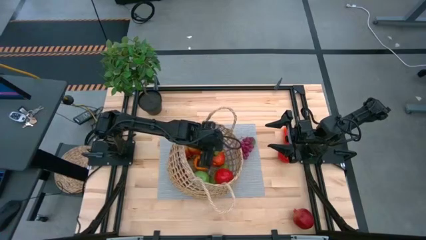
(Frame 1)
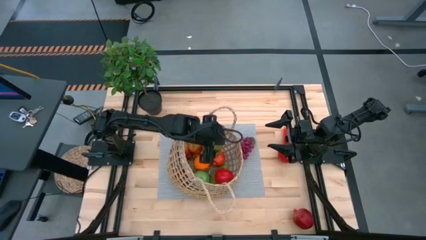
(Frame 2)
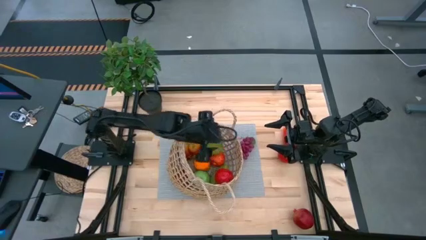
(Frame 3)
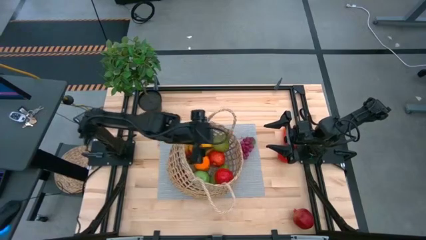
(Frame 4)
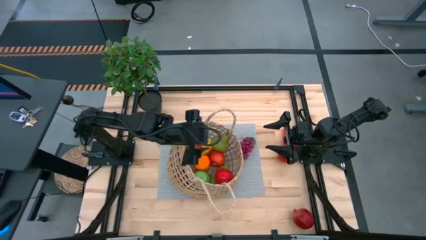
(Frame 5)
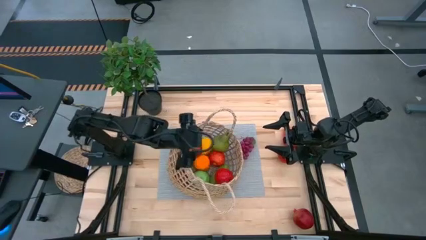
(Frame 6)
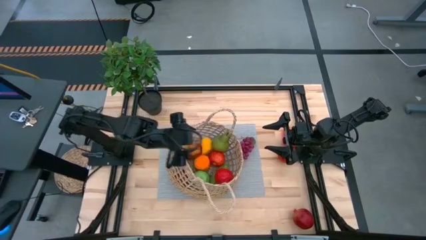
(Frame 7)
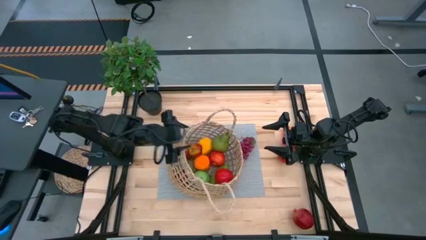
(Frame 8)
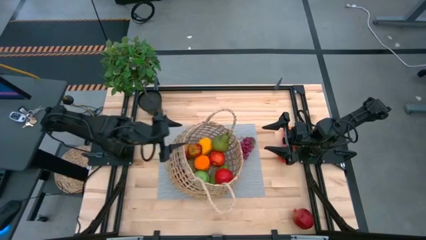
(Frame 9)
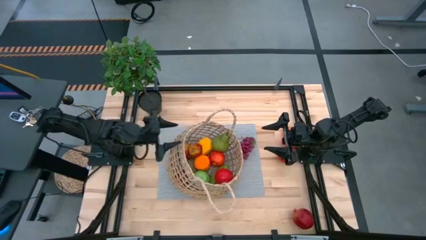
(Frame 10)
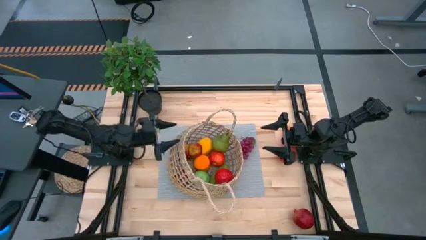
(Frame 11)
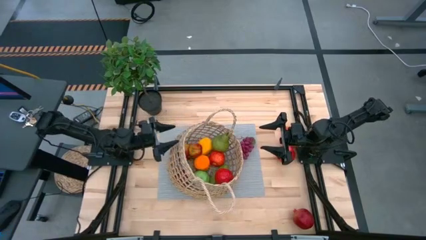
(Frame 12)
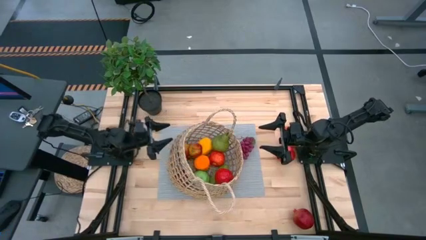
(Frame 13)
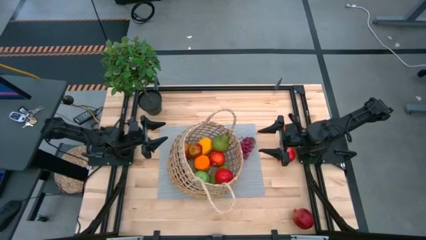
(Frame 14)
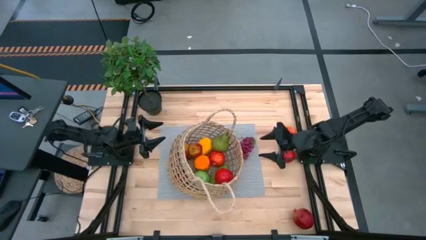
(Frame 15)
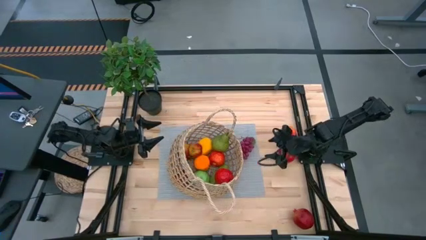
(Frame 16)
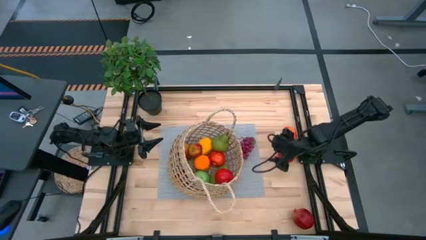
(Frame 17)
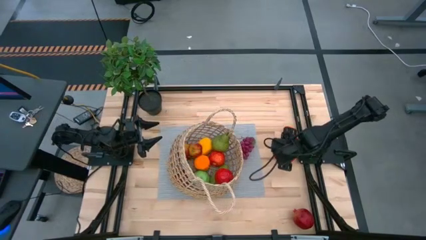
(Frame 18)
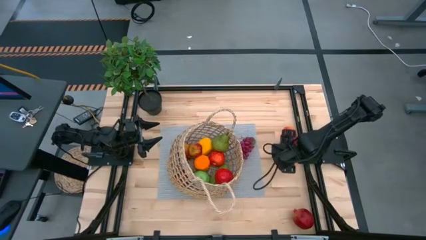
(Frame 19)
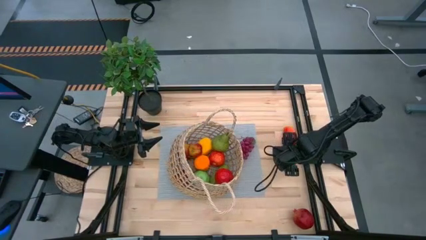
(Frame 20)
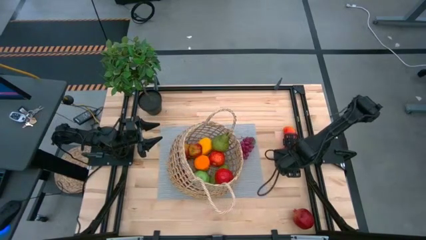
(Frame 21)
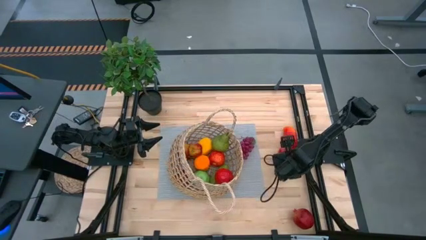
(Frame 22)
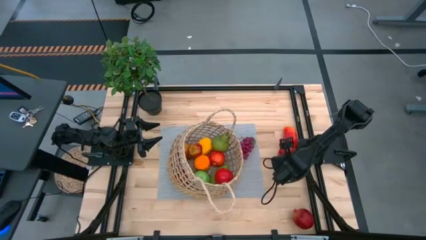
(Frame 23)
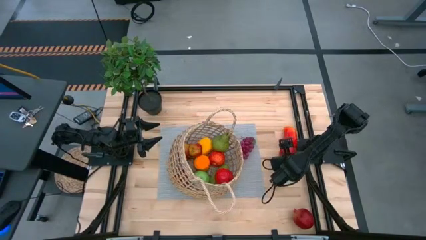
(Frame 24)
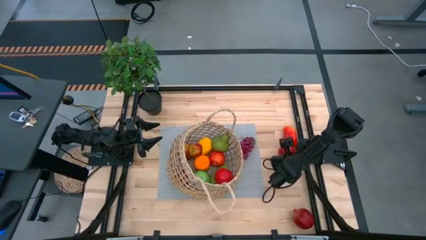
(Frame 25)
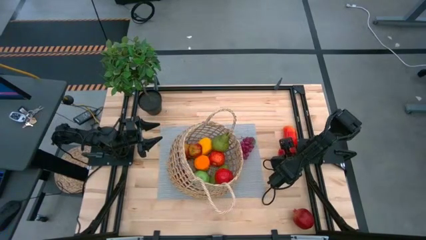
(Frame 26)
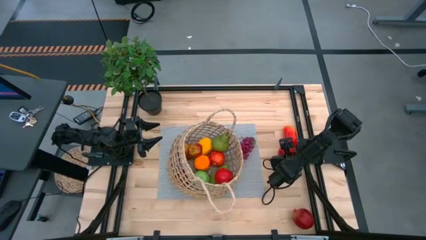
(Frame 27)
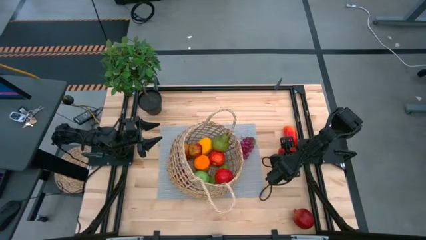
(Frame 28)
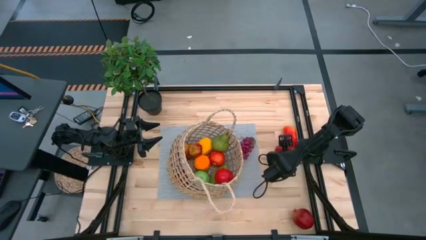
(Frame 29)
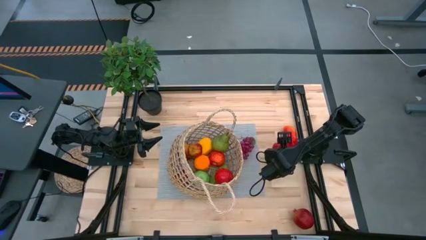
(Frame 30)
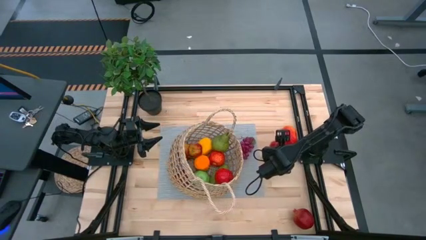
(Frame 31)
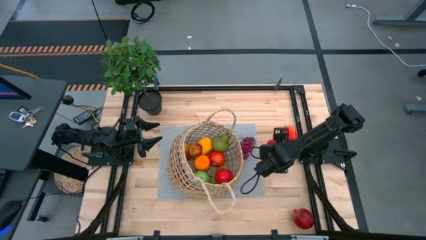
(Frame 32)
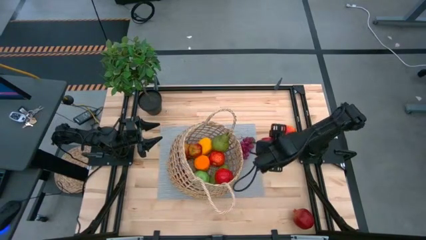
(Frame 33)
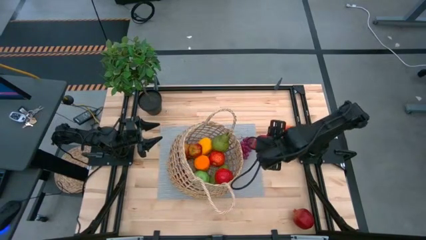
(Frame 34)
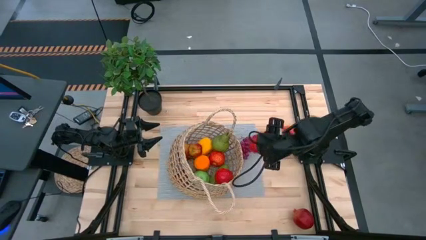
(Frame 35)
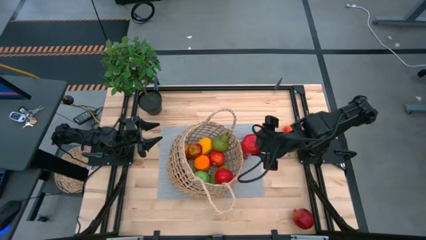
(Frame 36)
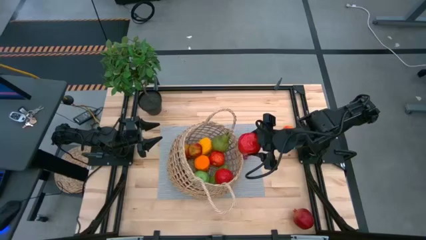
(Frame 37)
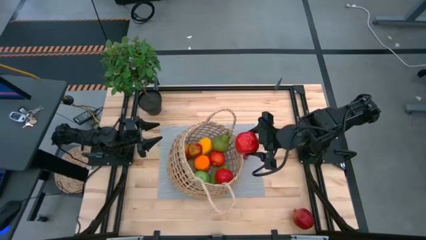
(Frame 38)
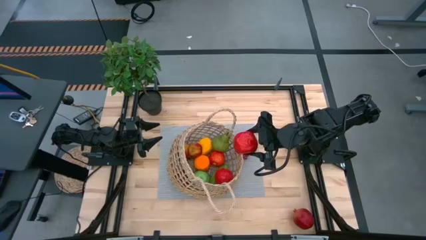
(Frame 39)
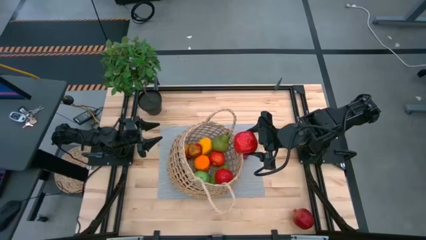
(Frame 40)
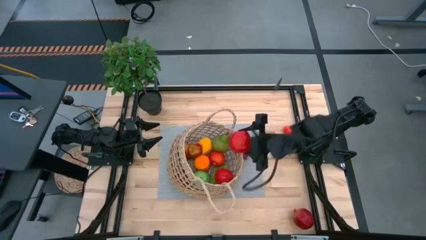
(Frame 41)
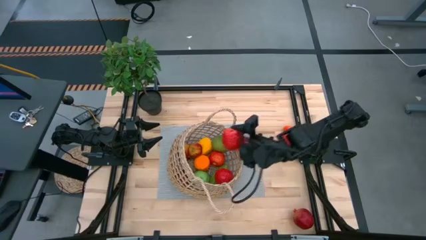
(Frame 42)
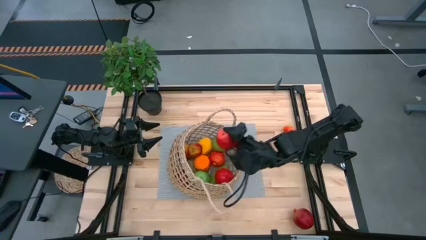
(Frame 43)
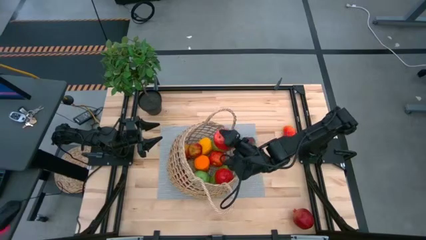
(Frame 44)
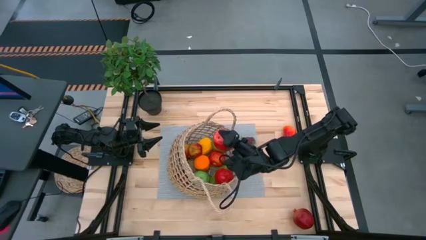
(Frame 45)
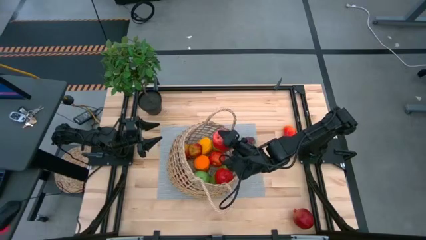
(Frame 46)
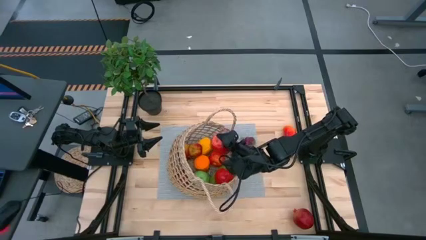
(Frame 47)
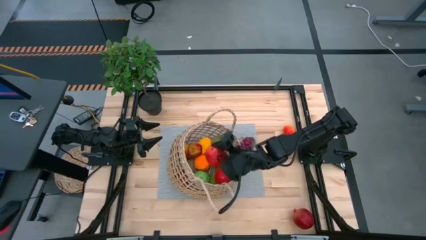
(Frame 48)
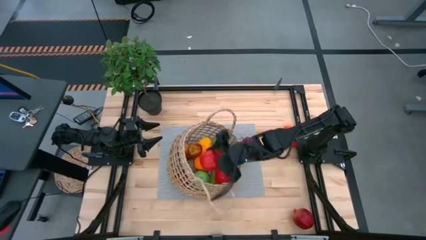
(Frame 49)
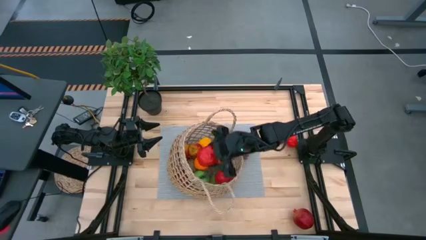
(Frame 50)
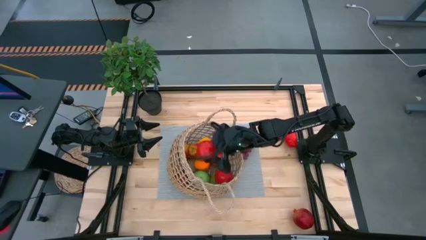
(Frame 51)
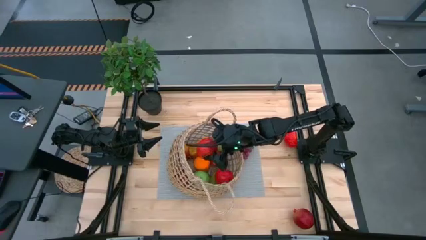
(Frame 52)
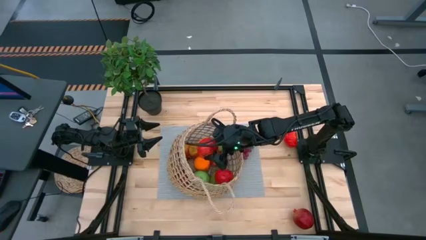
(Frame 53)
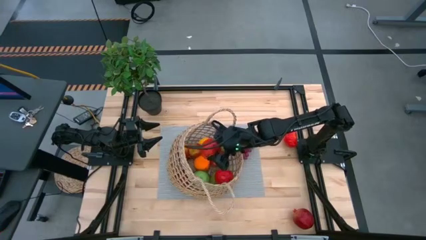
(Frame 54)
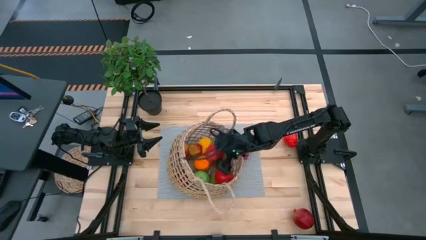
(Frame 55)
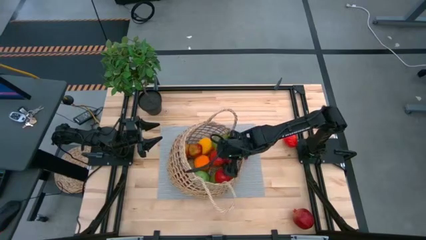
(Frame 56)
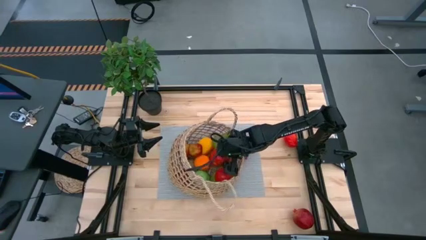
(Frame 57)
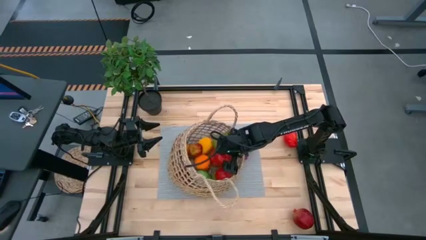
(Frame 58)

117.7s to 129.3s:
Task: Build produce basket
Put the red apple into the brown basket

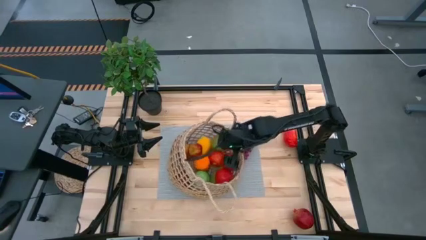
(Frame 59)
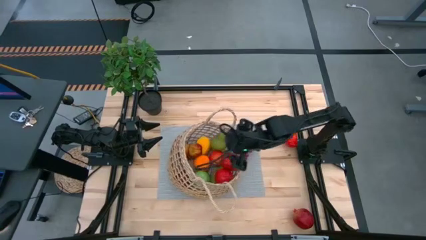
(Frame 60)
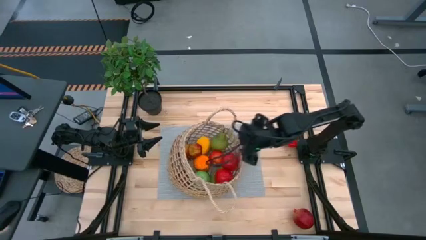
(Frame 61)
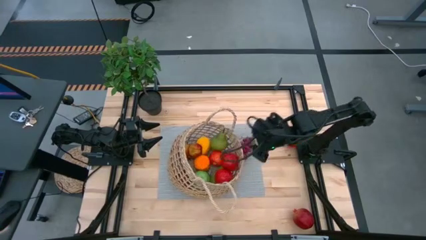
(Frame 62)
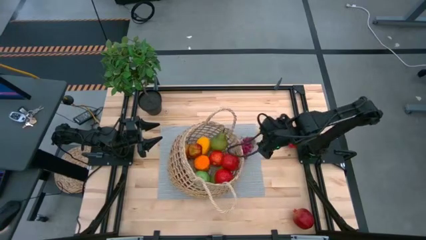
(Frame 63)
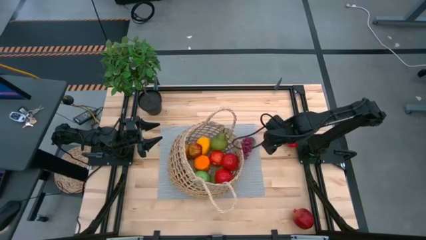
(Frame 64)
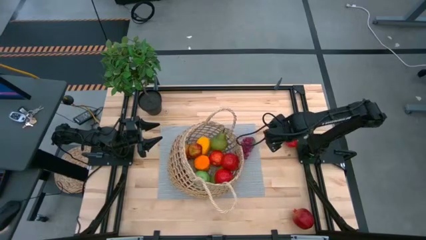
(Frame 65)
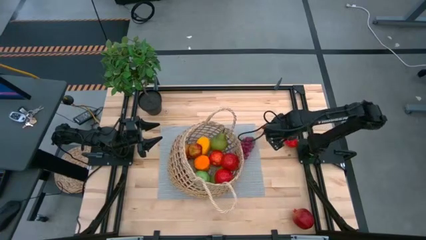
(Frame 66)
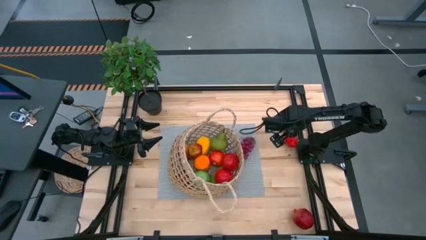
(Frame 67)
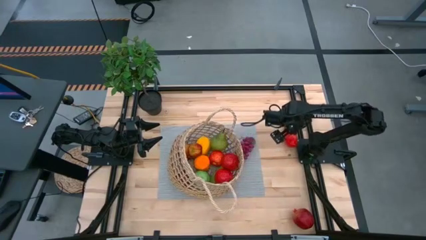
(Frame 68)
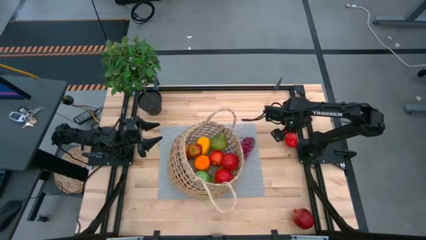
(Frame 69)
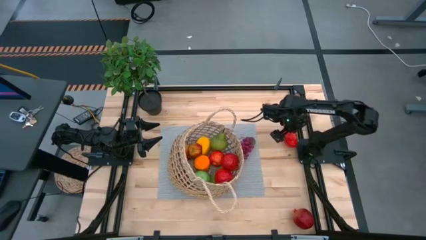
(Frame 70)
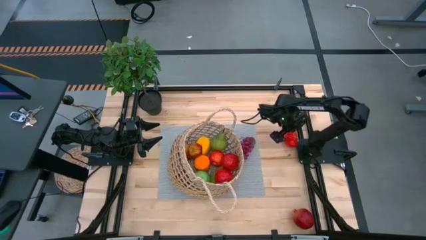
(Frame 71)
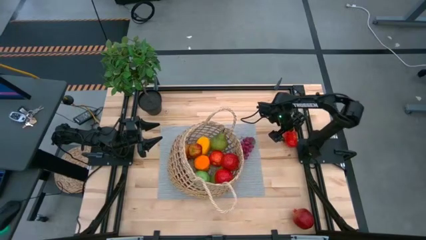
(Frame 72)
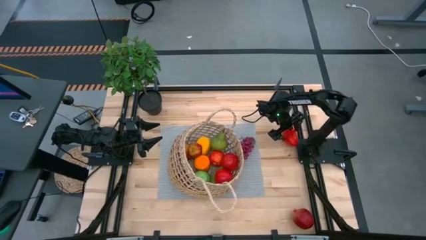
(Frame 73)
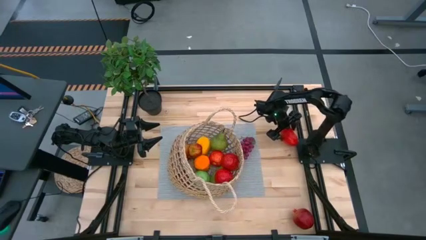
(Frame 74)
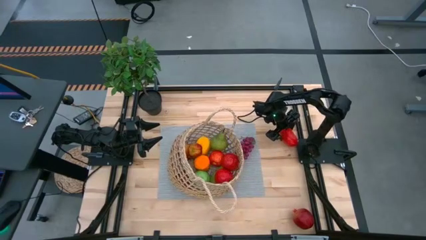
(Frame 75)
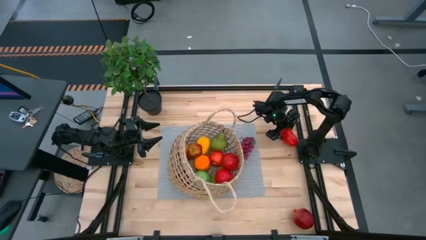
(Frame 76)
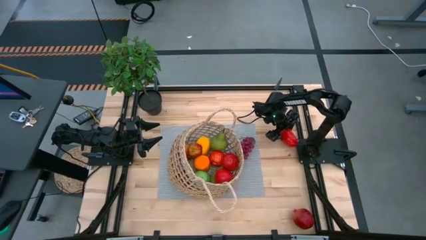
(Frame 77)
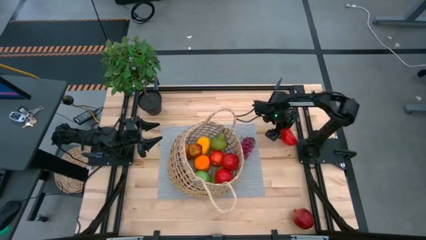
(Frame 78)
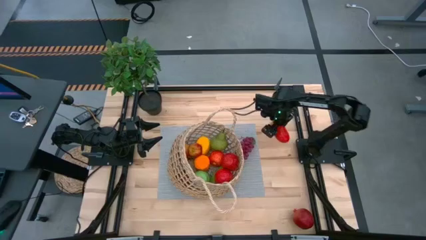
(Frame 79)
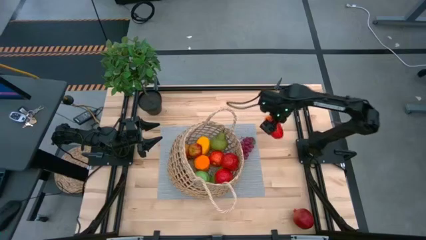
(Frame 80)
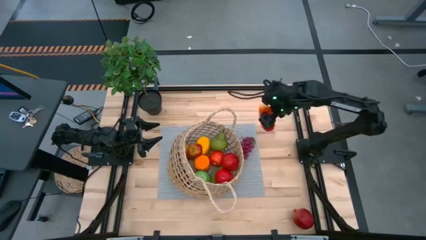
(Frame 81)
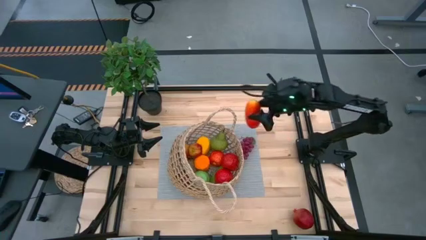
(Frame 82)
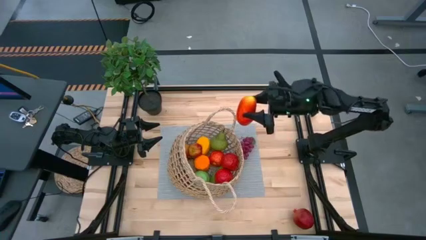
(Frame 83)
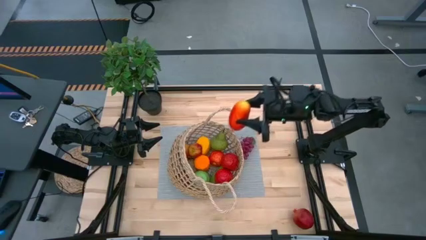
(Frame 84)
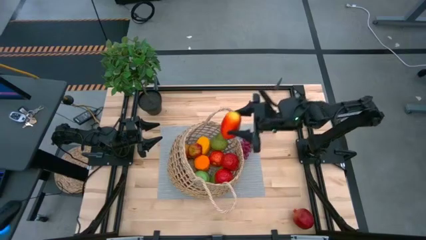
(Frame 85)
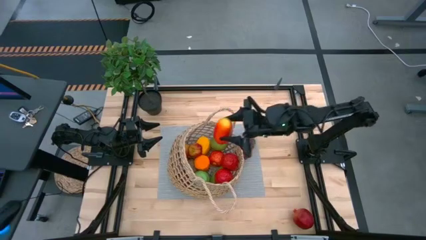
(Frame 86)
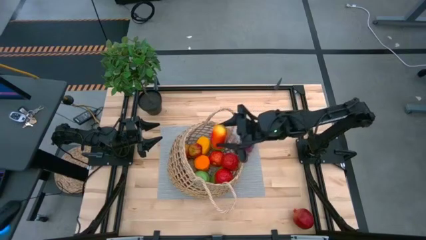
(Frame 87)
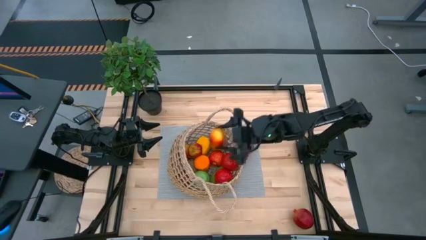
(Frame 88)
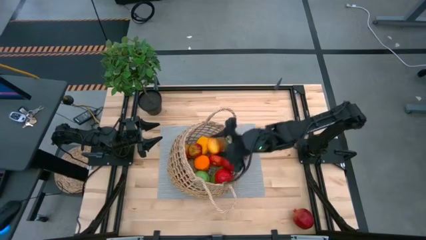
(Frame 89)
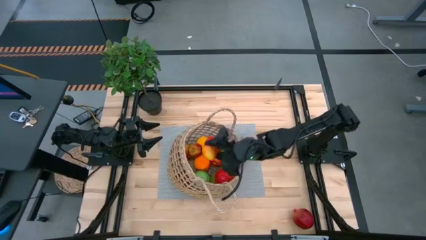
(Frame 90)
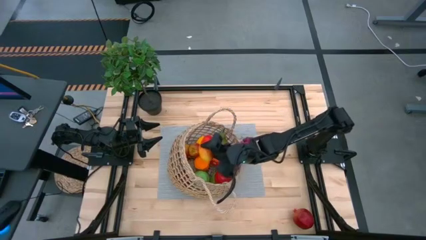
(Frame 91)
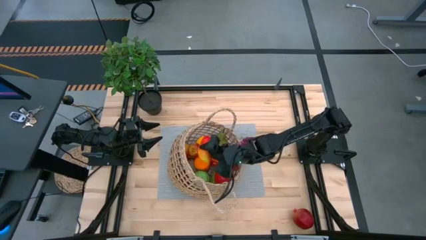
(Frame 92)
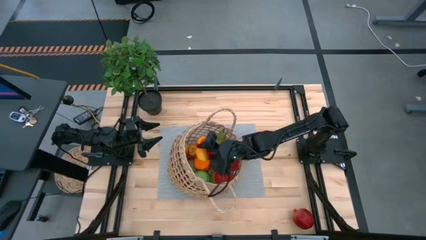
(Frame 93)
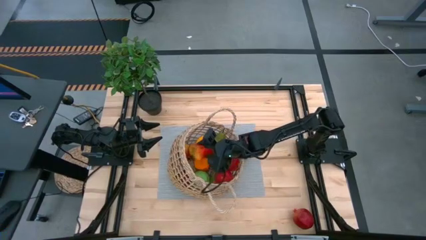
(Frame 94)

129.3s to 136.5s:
Put the orange mango into the brown basket
